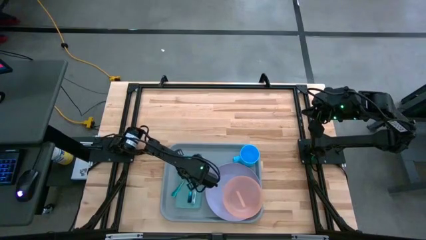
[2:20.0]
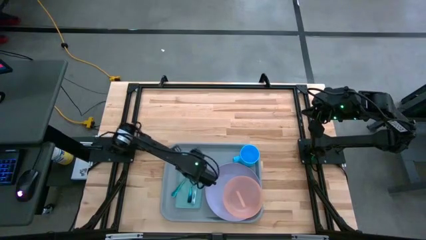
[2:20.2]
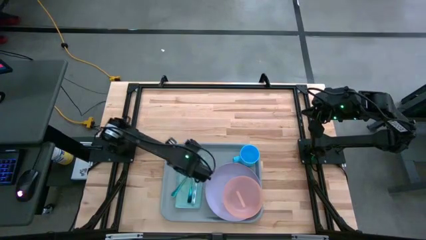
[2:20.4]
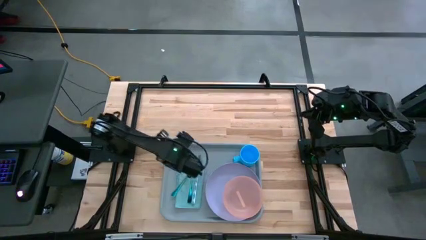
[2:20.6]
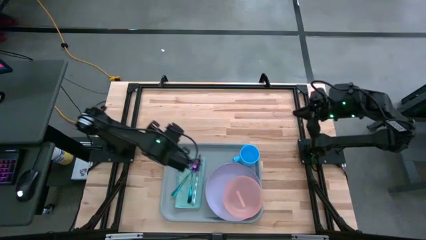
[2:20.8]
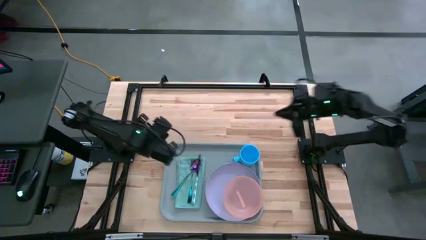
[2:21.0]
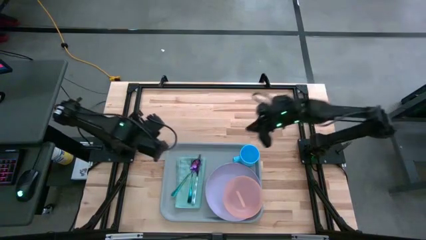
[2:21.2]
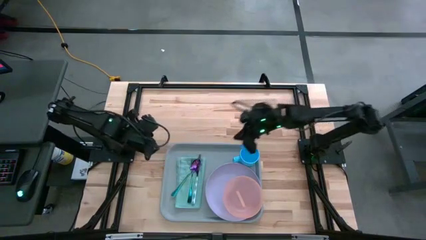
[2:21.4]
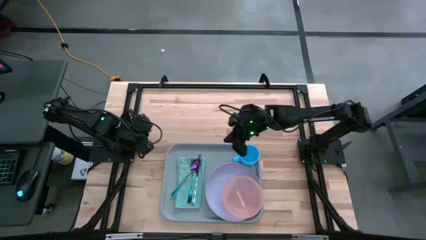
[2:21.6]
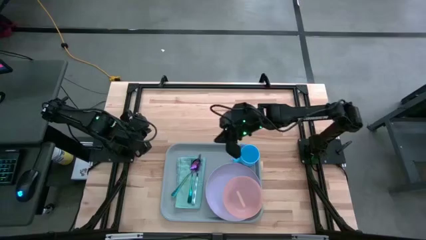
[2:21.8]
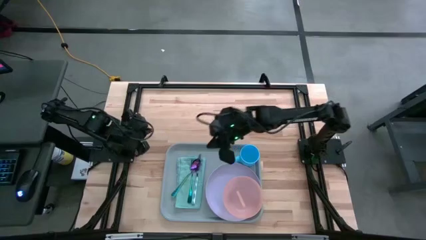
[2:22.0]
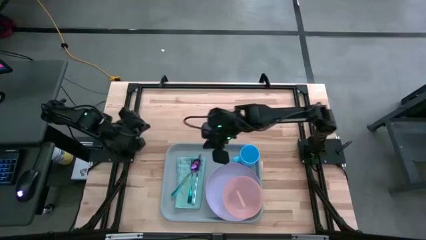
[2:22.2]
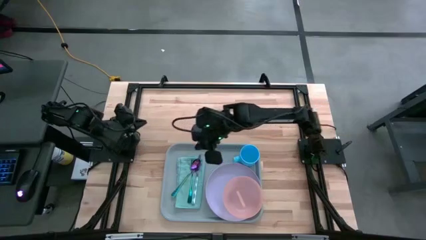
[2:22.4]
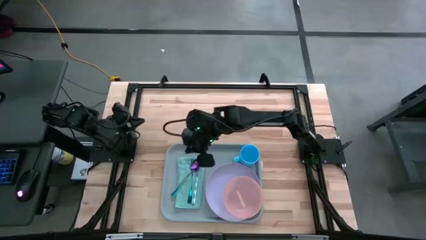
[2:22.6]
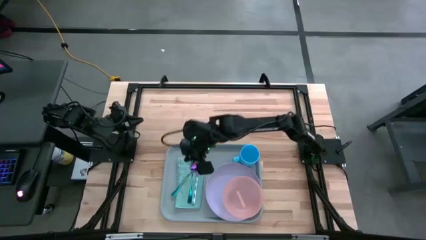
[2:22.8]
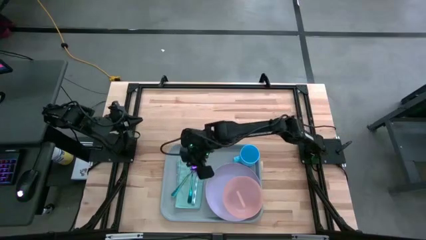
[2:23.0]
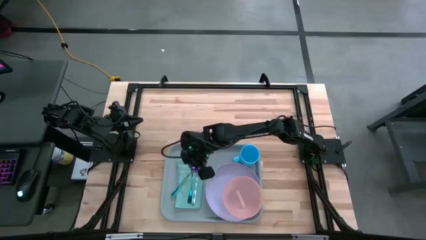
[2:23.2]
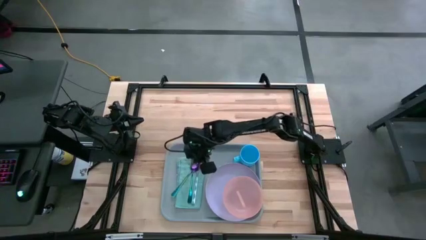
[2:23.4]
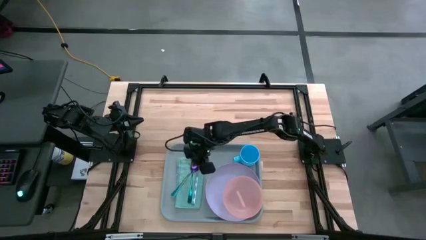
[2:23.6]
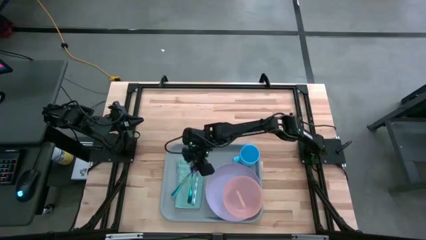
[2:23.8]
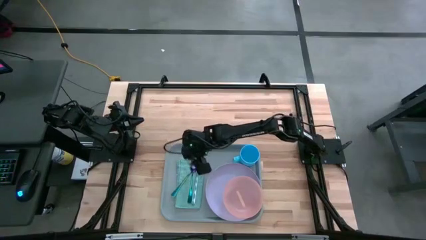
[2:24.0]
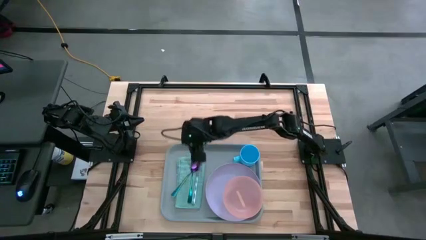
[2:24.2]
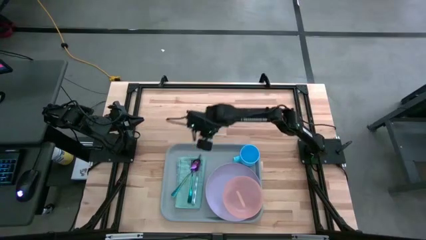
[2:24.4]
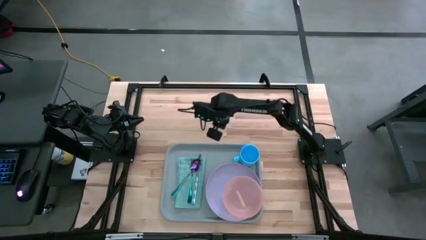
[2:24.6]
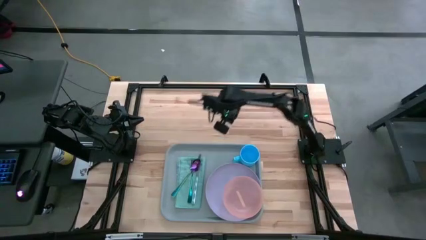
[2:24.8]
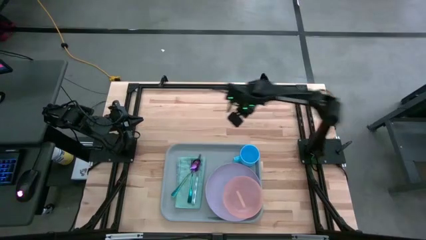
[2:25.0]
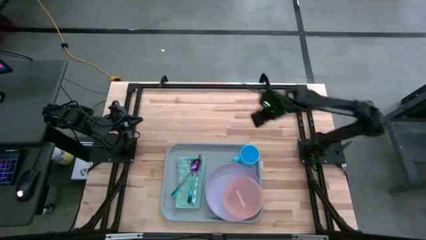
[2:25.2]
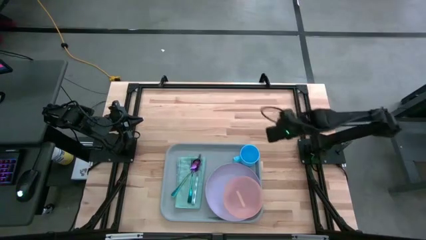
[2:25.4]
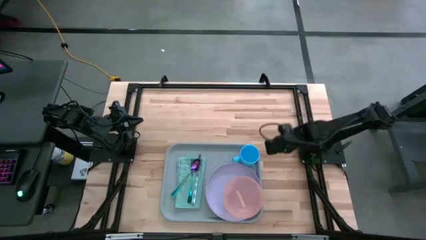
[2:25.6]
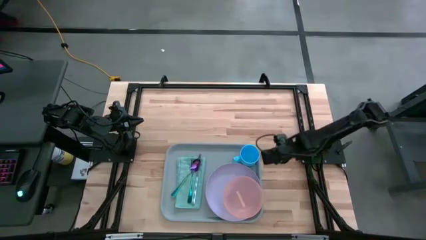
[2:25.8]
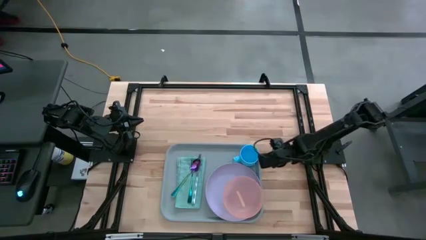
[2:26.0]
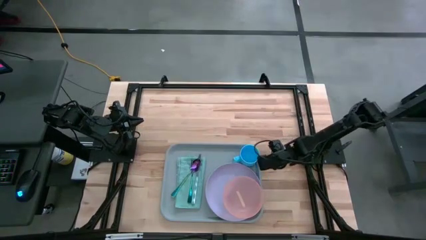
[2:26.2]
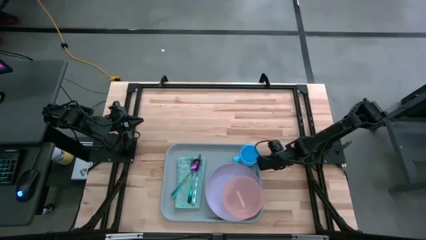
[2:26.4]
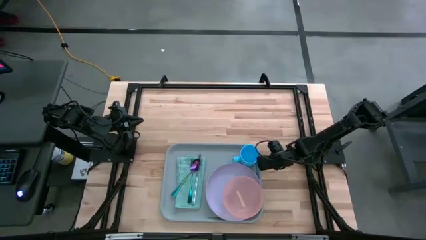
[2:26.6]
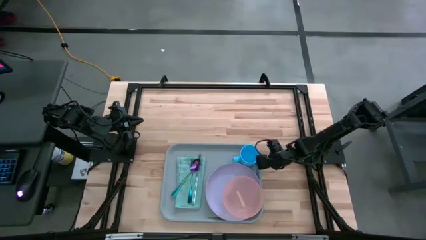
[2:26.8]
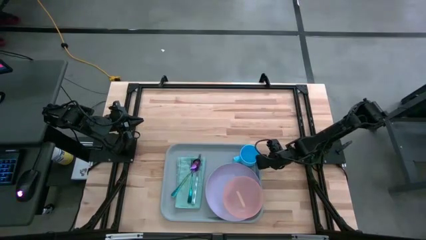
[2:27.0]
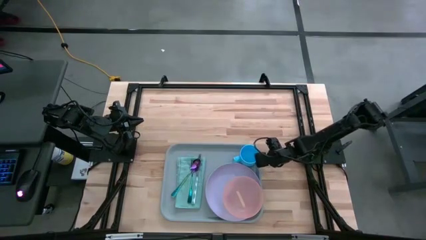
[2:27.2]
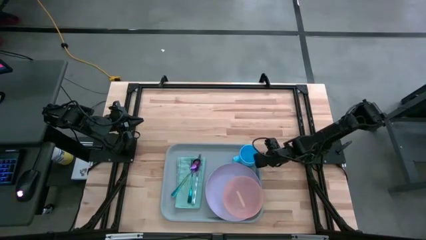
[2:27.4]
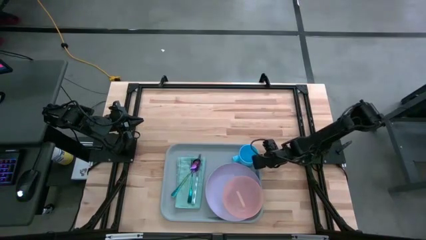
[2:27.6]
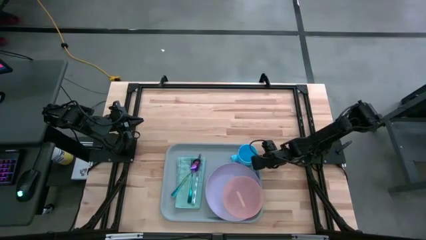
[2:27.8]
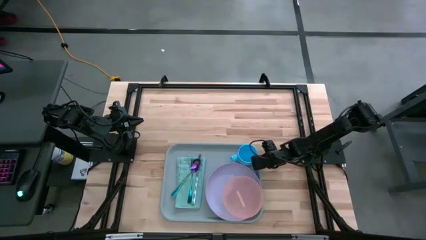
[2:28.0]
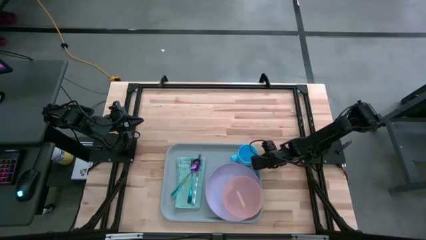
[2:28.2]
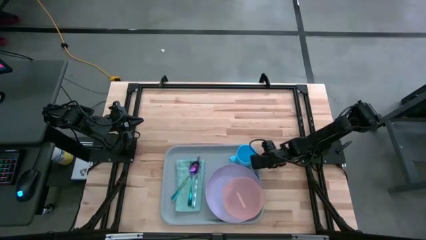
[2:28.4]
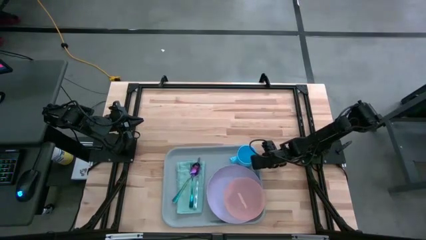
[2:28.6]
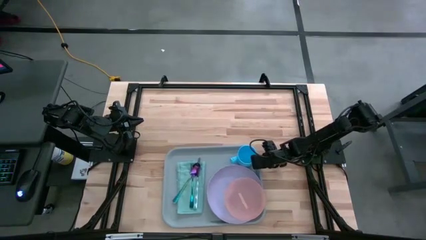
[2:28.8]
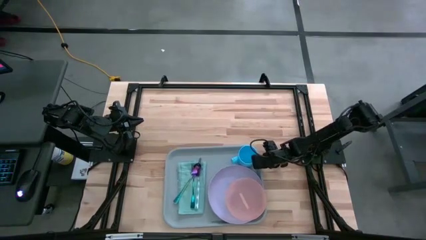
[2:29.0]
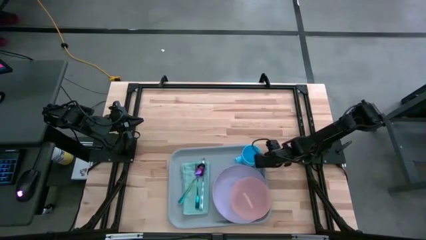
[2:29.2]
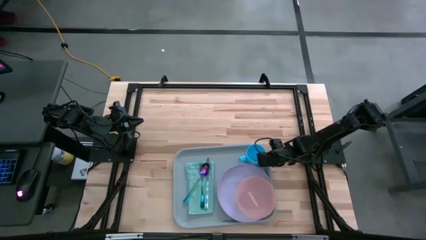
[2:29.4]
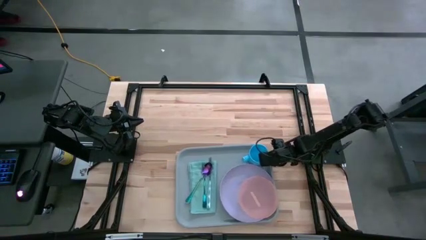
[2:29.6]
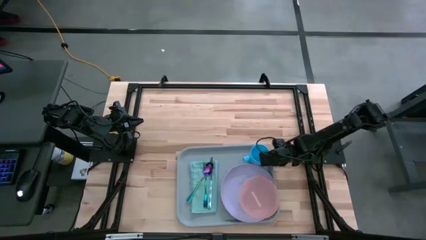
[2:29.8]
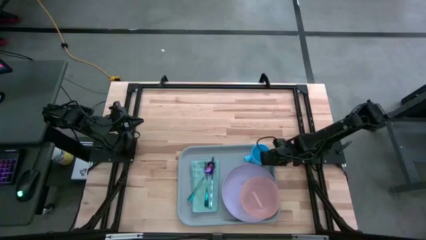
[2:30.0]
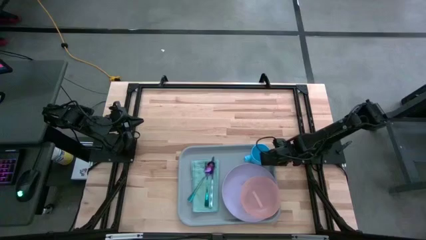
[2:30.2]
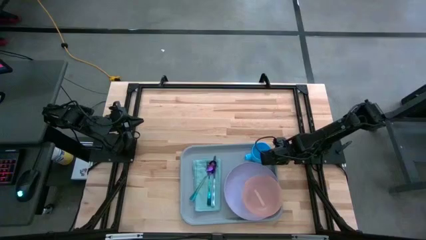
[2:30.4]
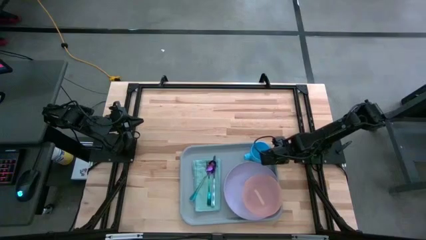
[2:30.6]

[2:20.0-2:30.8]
Task: Set up tray
Adjust the serving tray

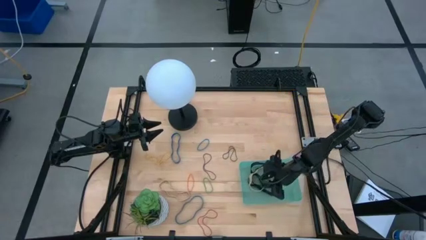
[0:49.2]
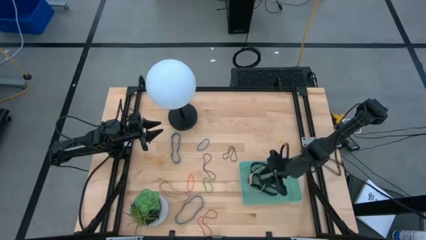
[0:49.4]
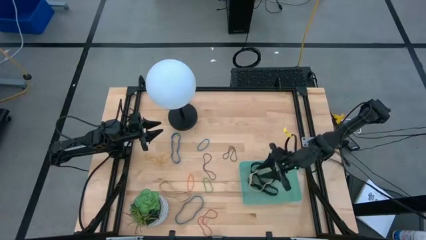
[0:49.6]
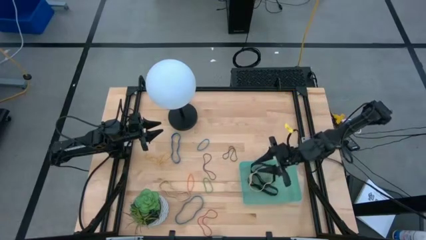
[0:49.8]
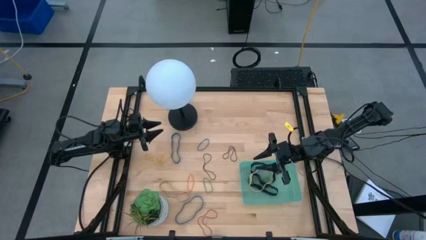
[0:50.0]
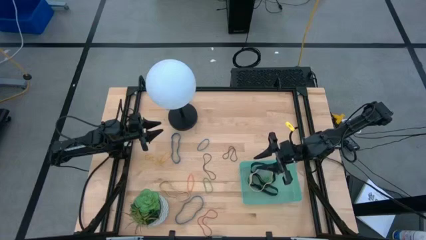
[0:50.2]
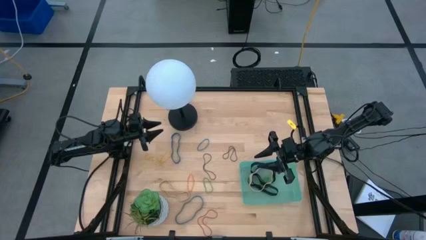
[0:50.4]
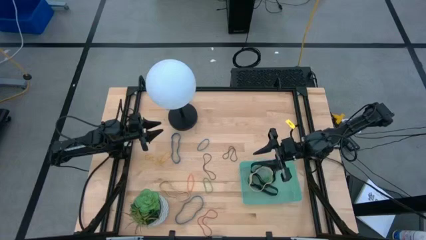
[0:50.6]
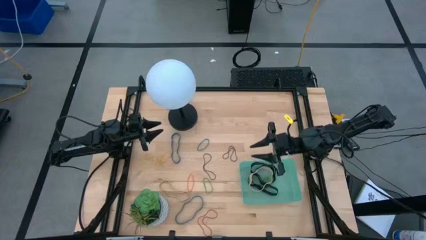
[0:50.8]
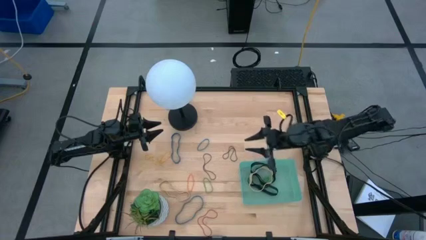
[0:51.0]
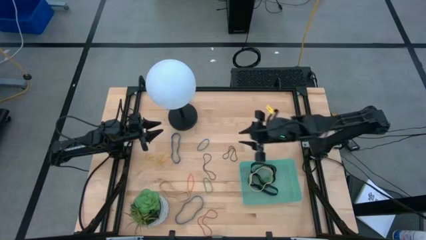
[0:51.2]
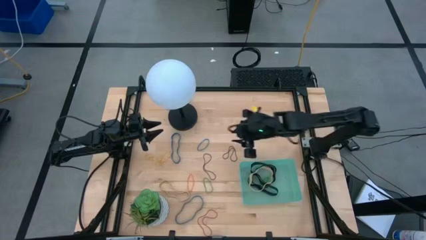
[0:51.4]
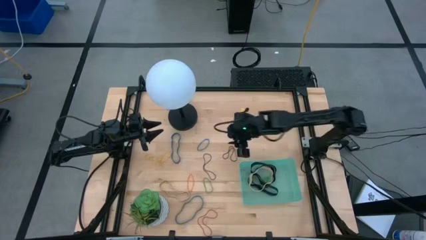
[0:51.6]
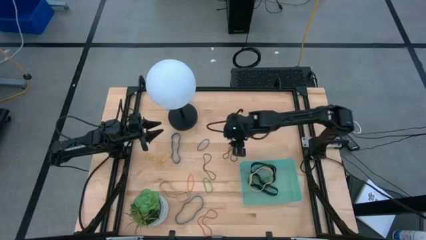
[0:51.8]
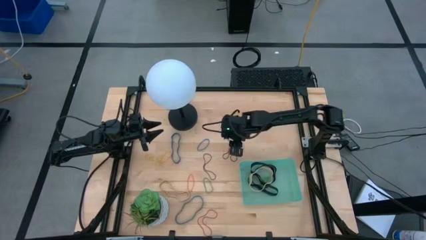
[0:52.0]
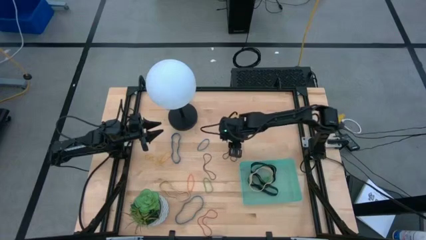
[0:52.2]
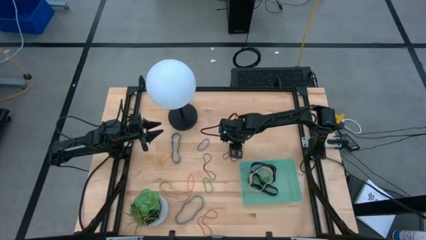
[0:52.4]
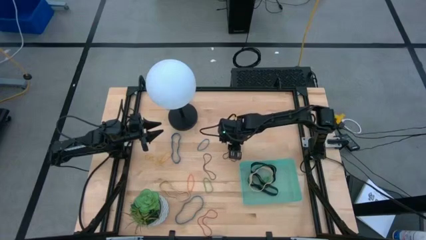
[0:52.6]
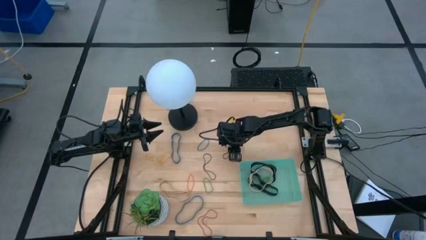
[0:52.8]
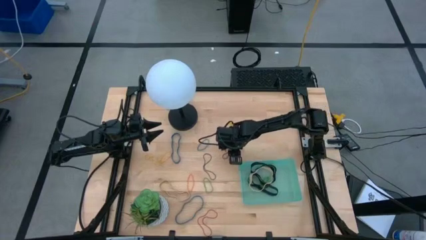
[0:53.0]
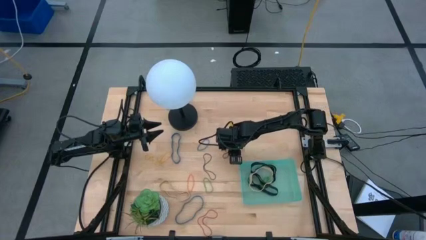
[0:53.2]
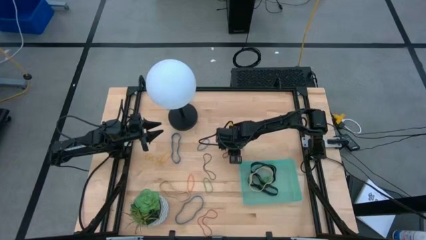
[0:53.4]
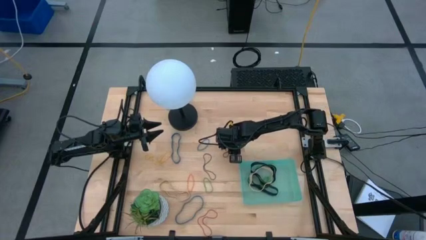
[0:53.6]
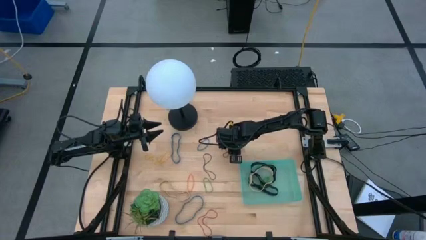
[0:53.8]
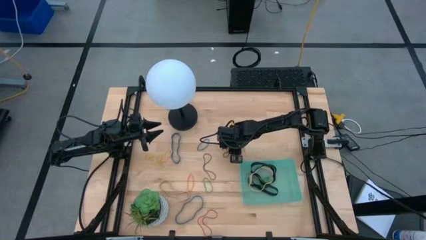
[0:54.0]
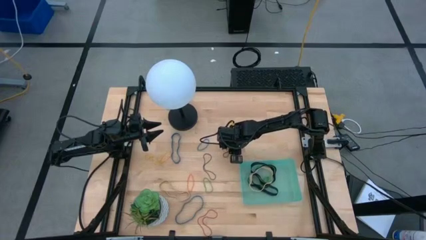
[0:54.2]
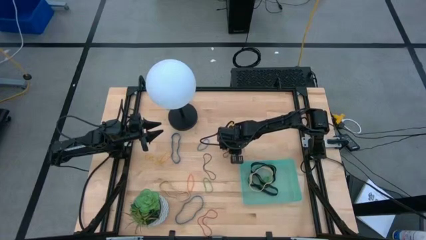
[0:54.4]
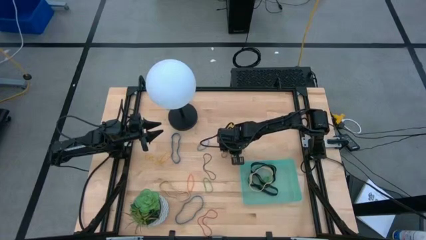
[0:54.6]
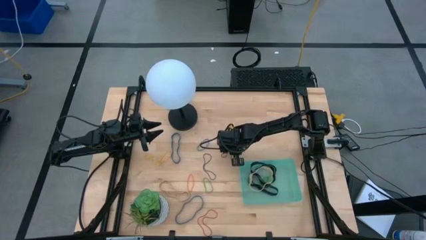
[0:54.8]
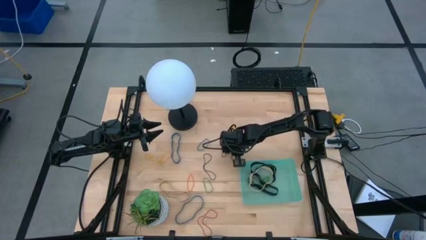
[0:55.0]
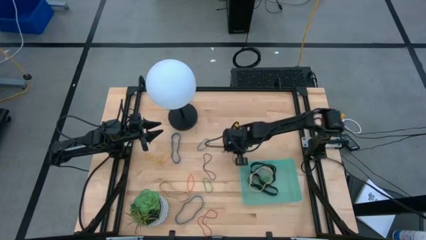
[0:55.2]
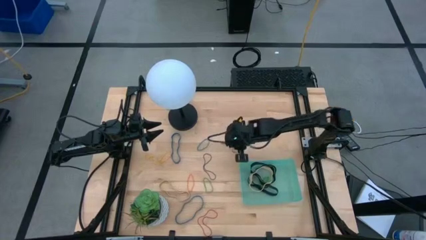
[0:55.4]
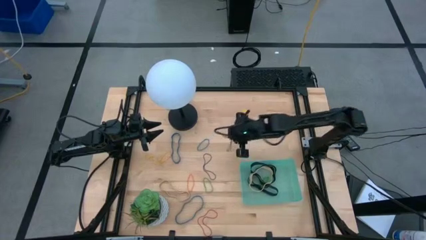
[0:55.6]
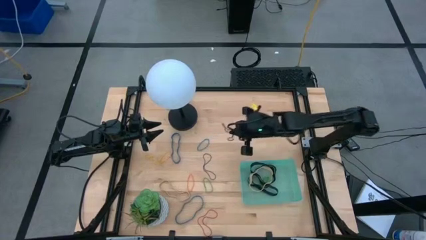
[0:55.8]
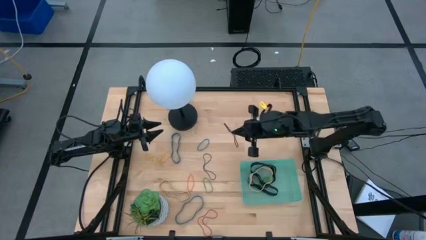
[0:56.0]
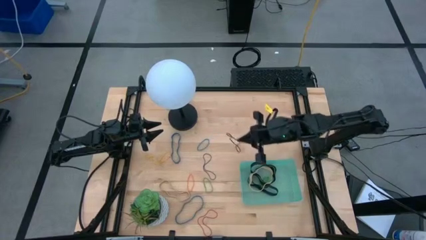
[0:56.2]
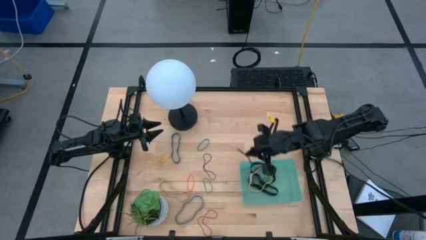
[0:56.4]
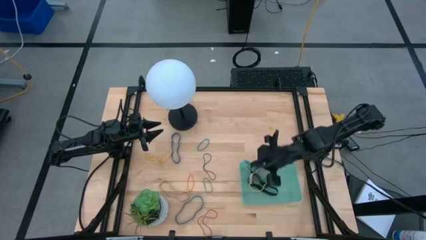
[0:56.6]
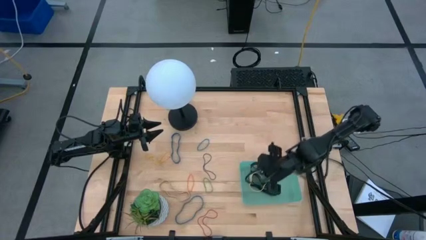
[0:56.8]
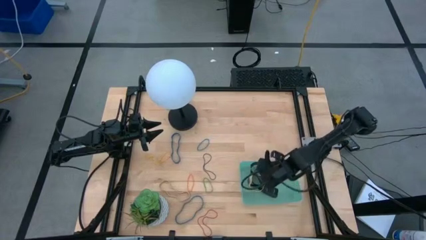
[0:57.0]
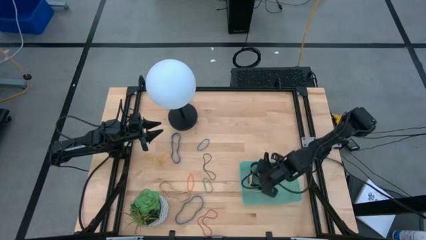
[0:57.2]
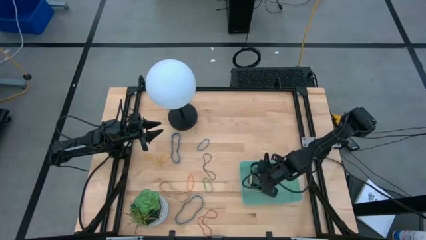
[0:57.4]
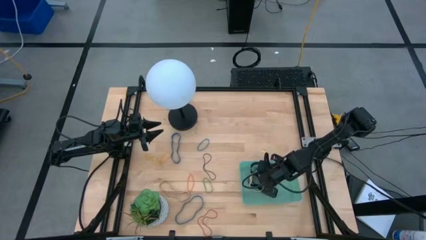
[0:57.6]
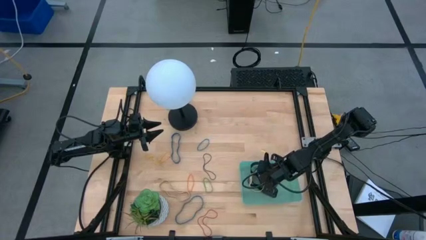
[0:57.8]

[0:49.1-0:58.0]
Task: Pick and place rubber bands into bin
Put the top purple rubber band into the green bin
